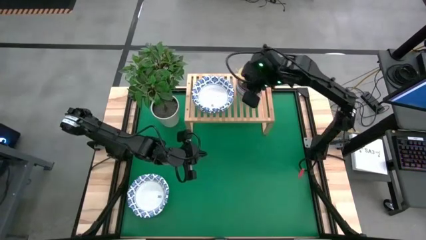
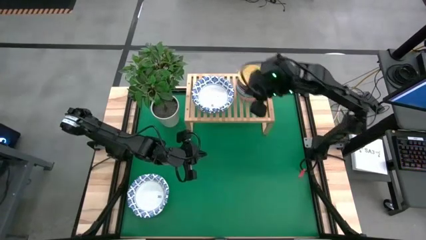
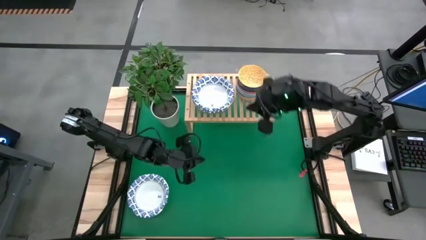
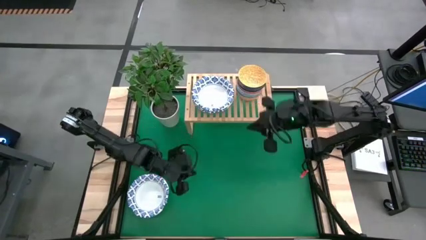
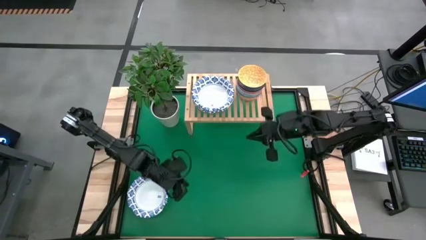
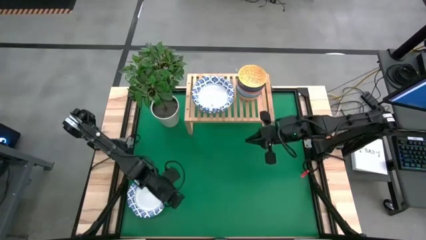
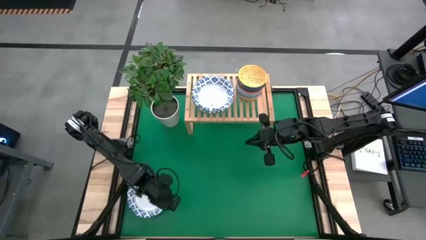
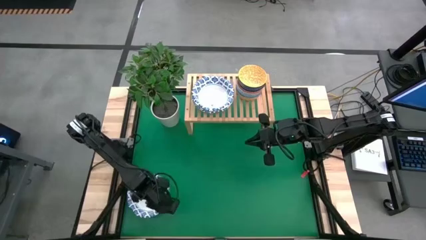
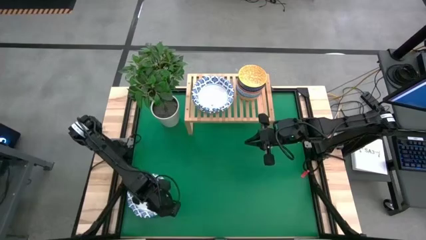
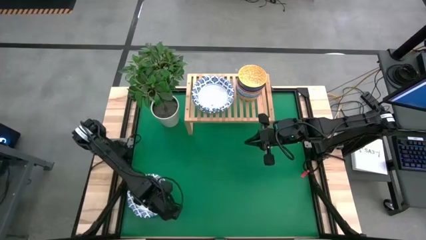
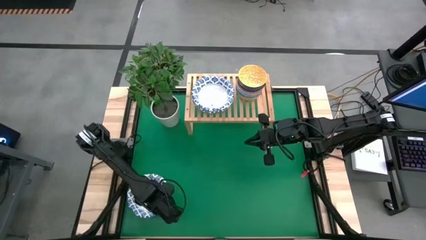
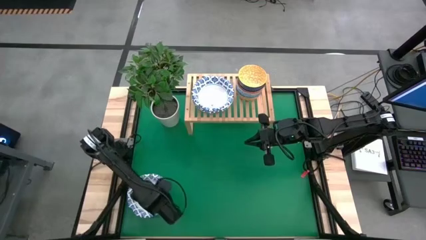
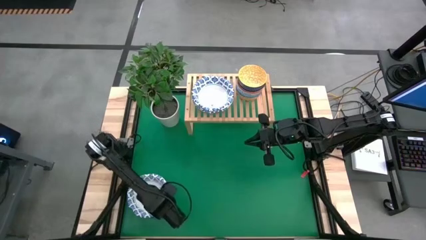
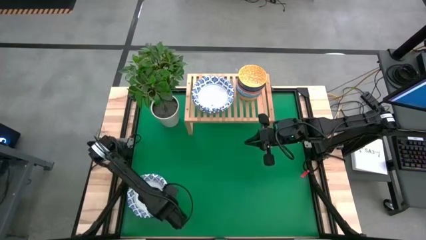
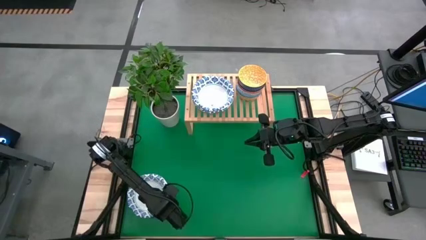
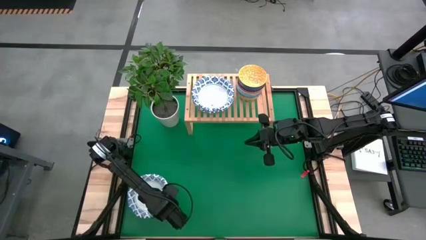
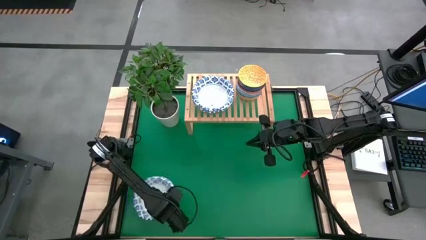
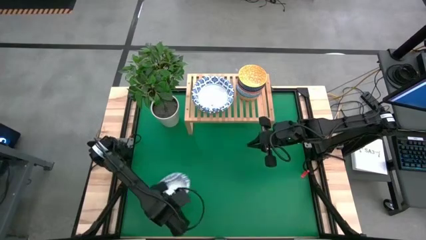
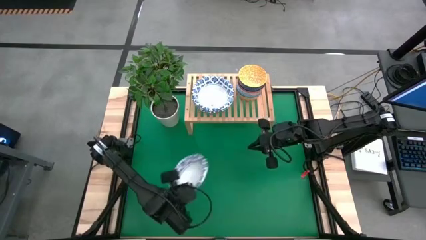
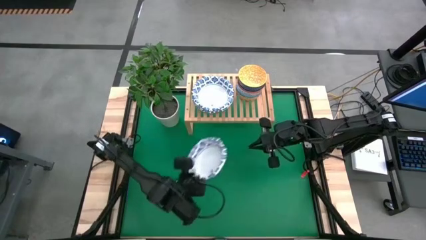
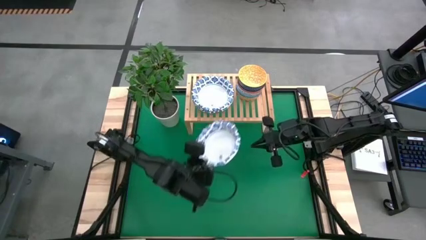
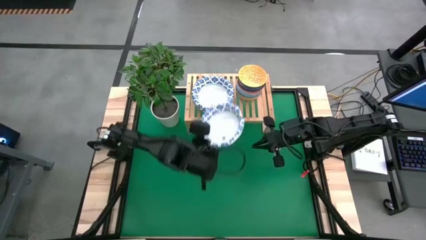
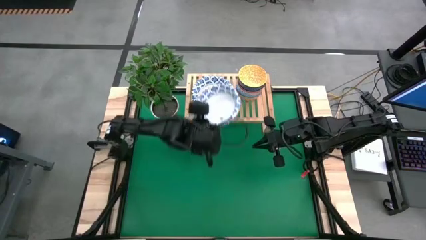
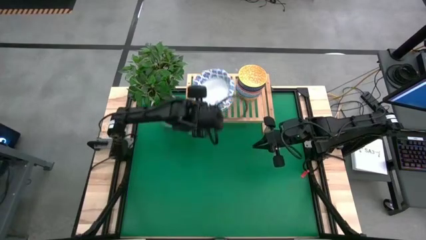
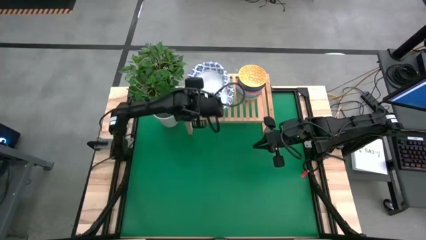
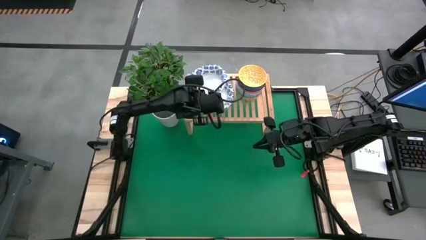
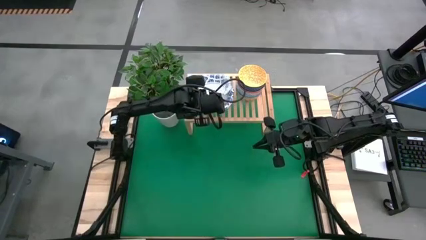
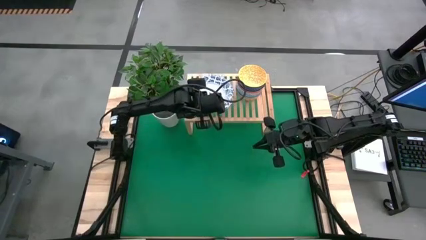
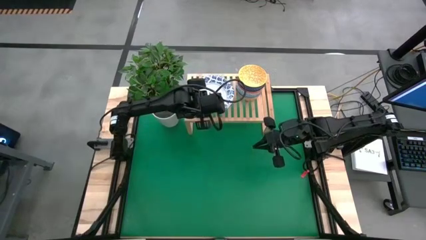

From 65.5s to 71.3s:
Task: Place and stack bowls onto a shelf
Stack the blue/white bowl on top of the blue/white bowl on the shelf

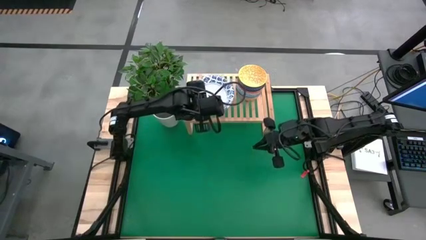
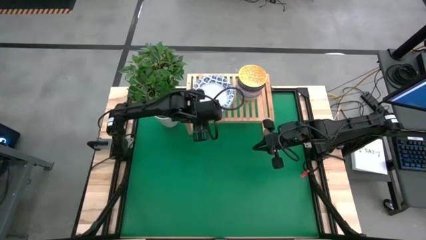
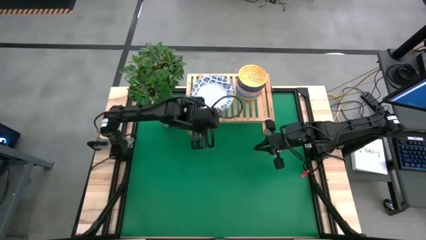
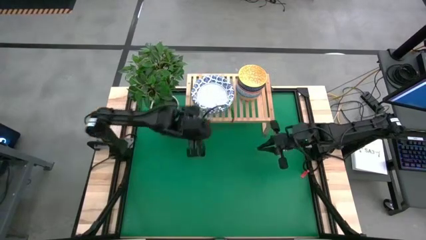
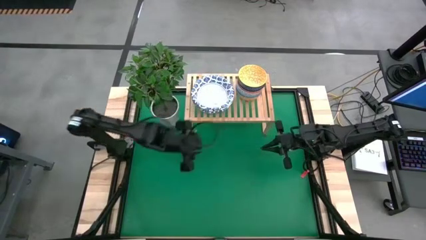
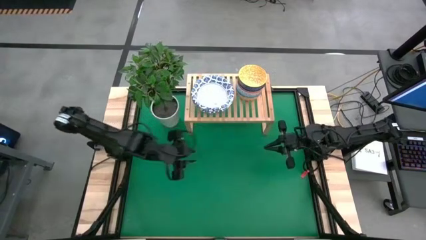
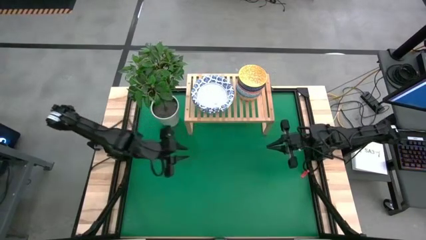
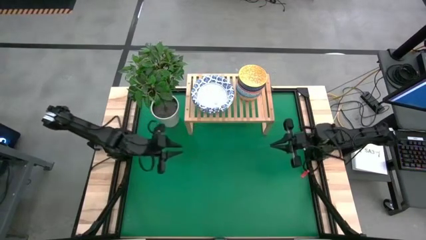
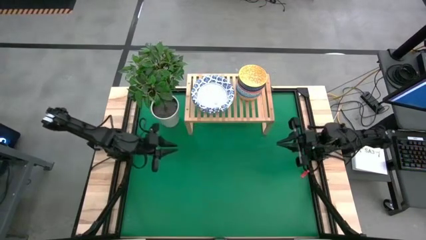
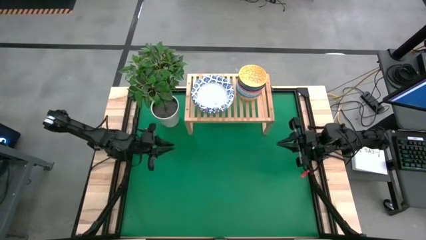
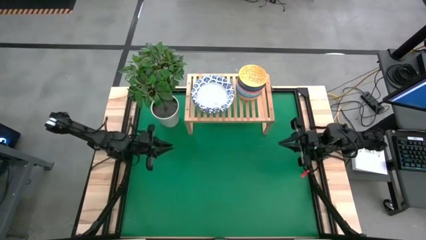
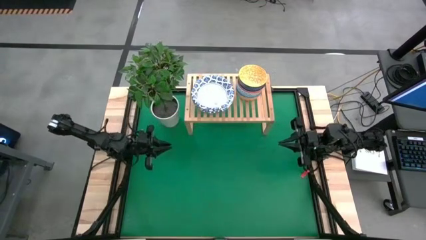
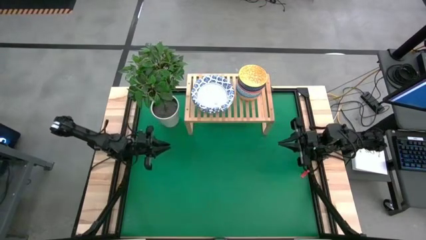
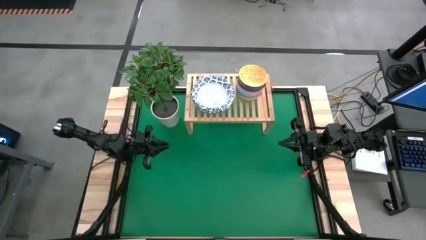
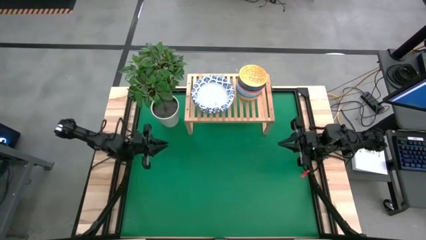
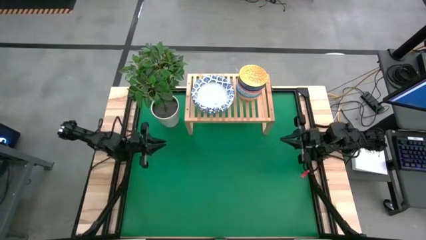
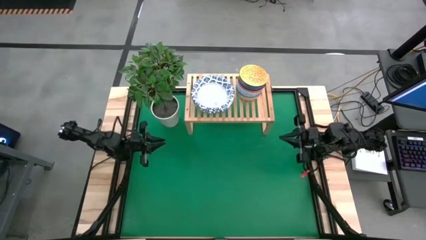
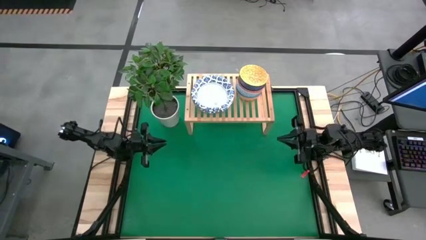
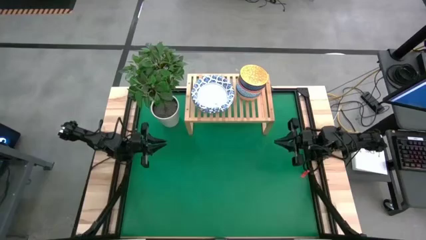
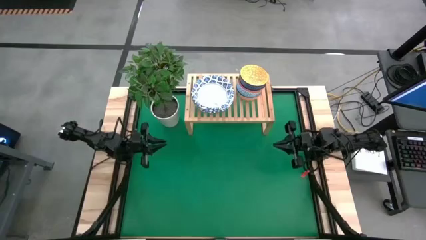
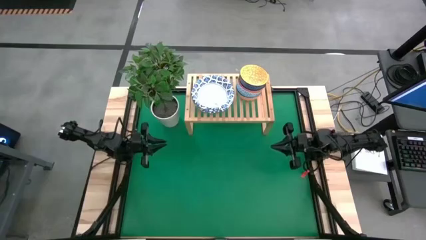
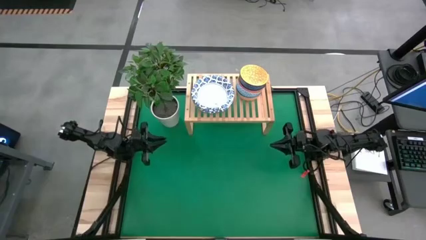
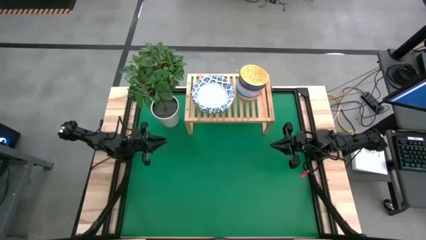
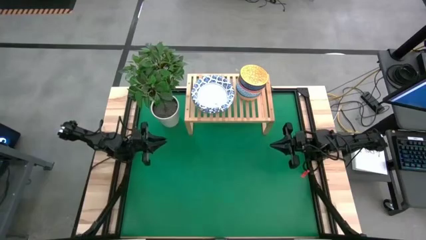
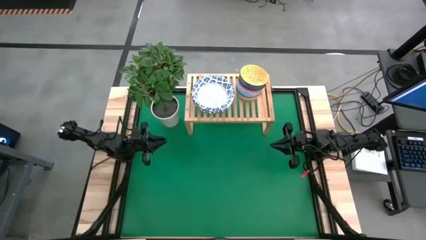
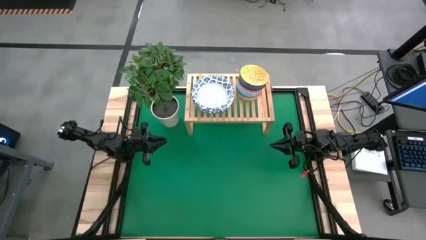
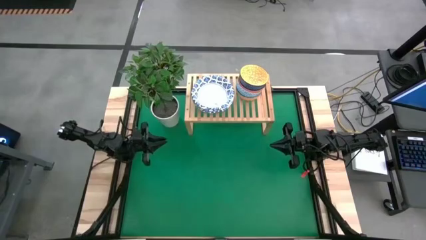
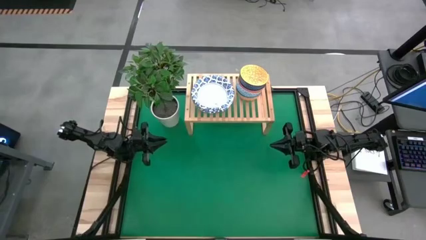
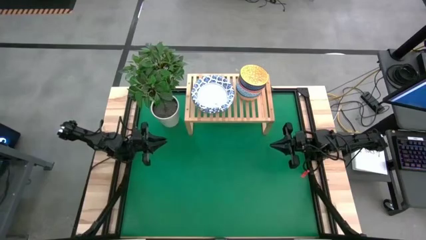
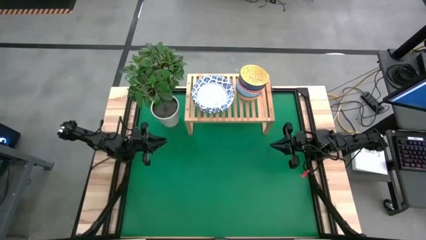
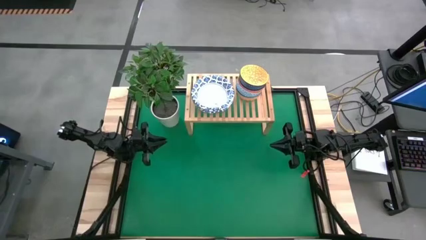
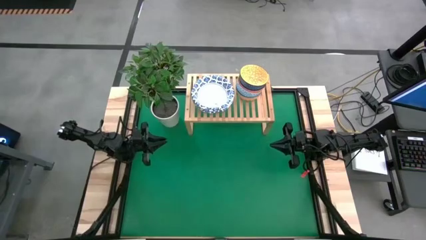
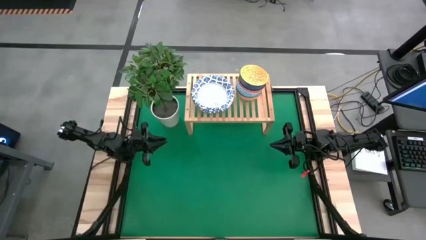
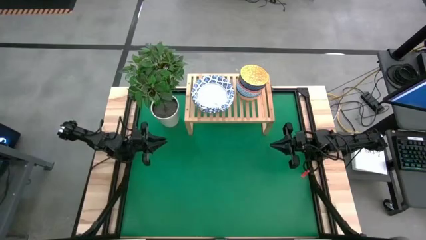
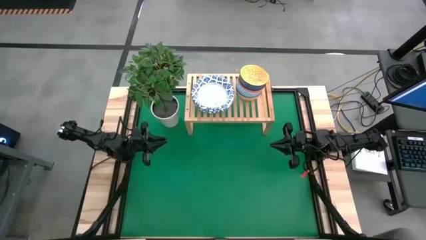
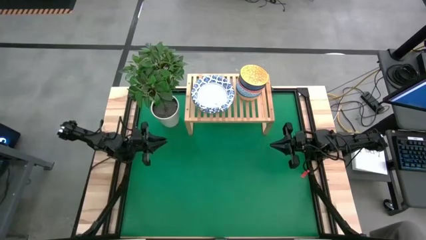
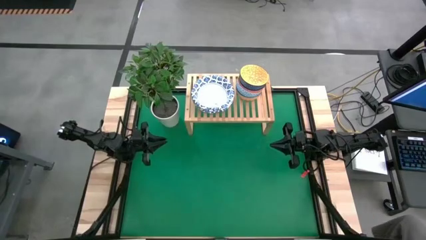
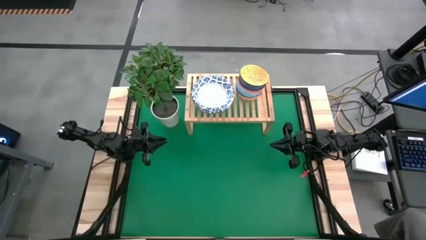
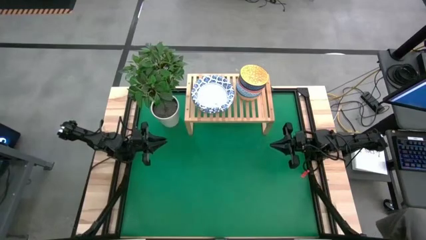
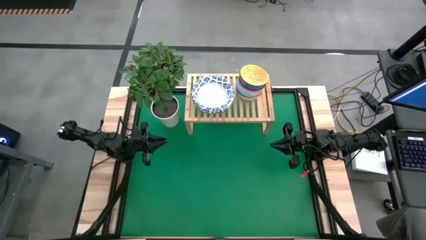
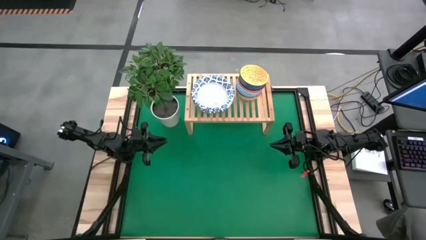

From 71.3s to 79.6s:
Return to Home Position
